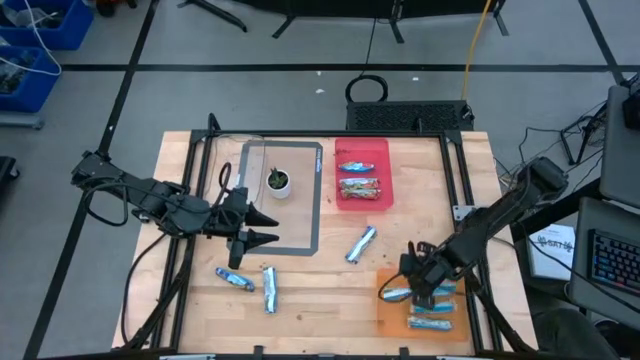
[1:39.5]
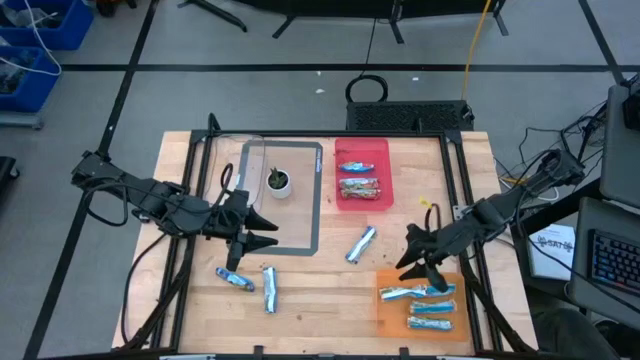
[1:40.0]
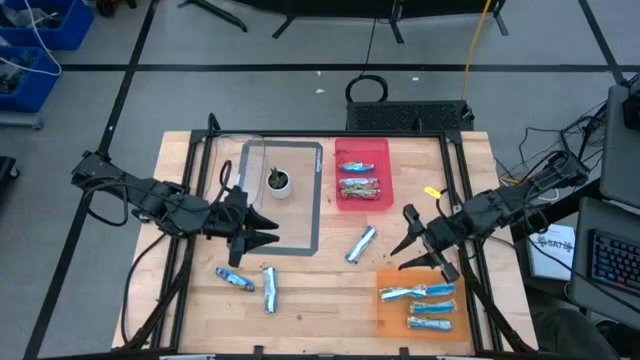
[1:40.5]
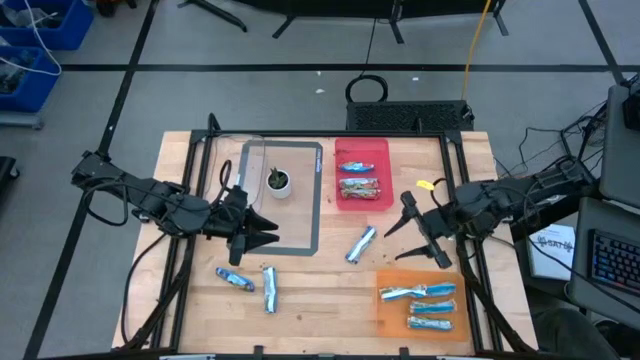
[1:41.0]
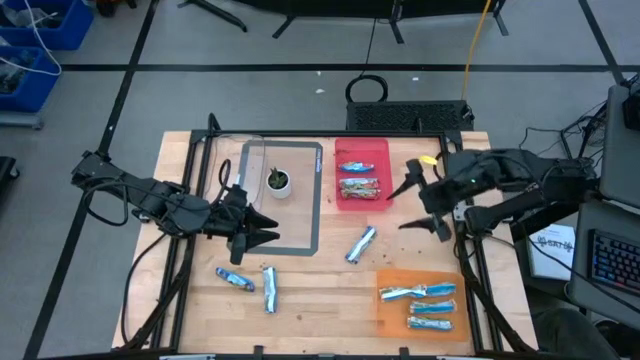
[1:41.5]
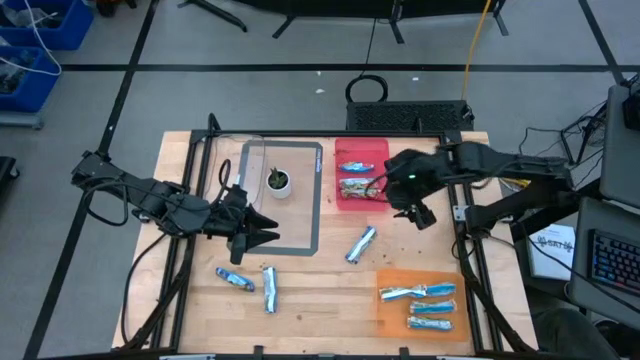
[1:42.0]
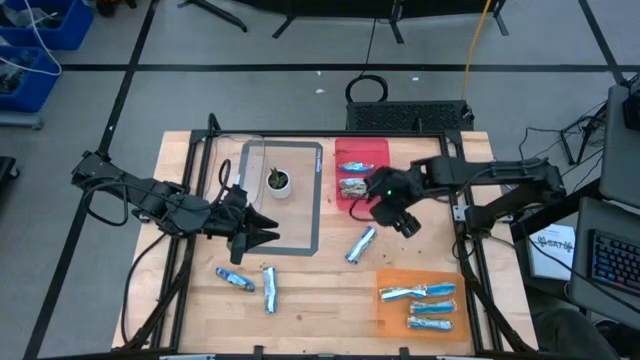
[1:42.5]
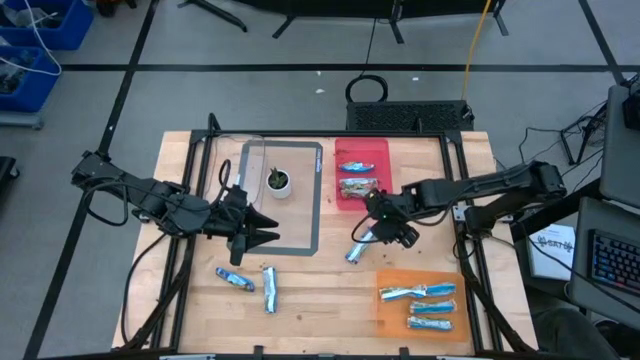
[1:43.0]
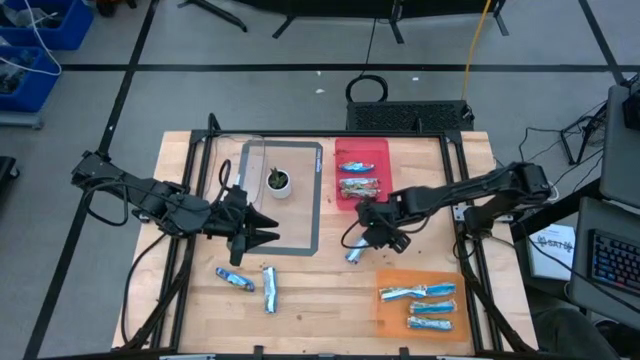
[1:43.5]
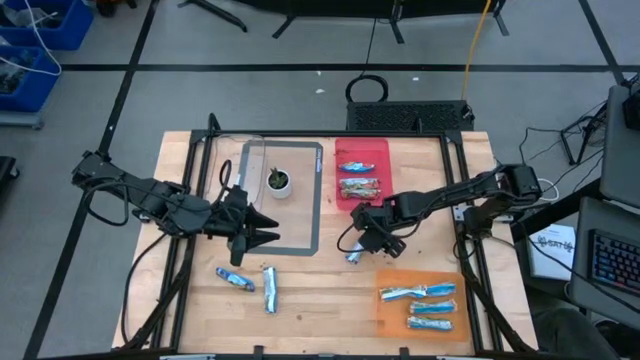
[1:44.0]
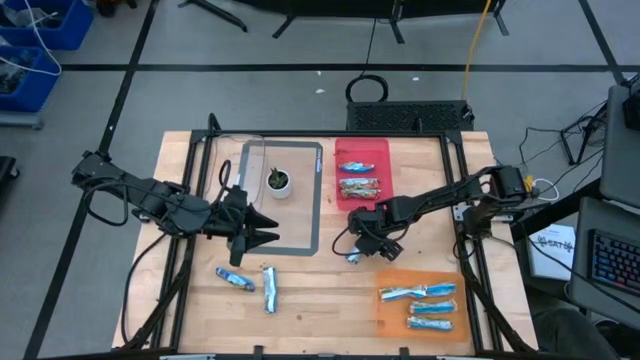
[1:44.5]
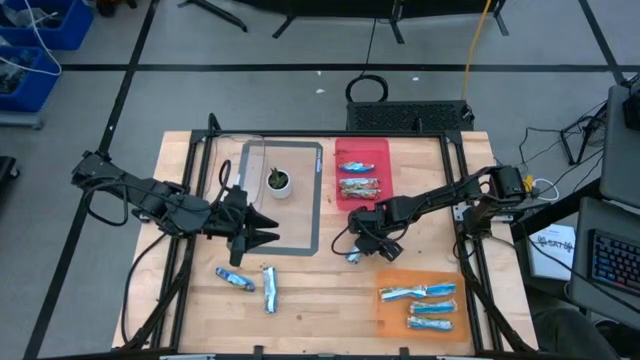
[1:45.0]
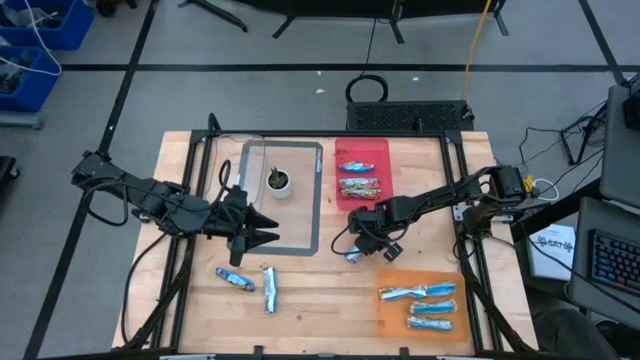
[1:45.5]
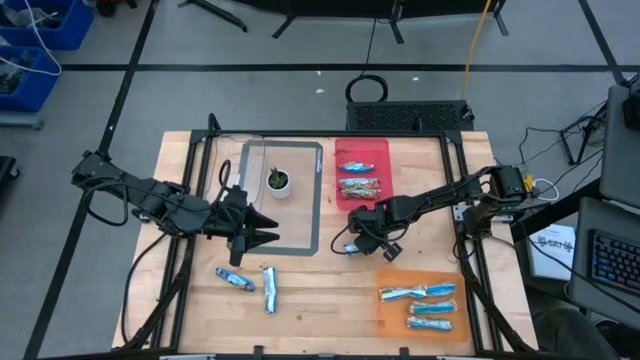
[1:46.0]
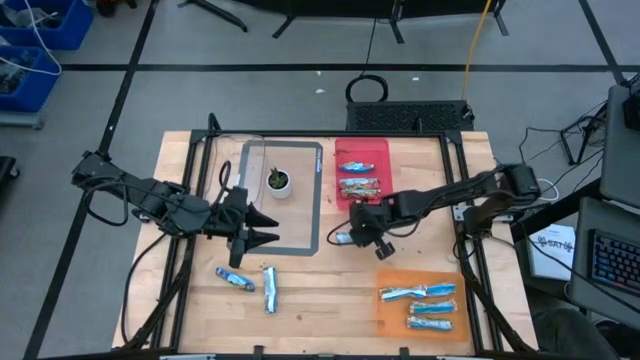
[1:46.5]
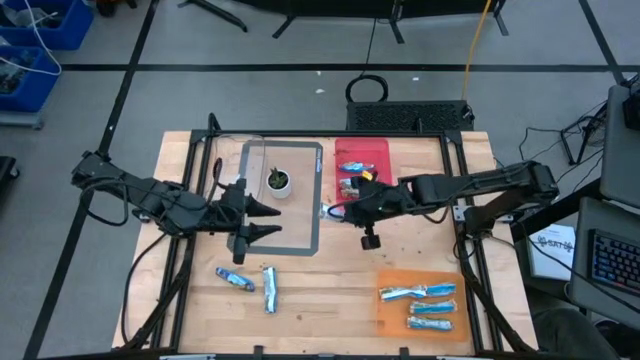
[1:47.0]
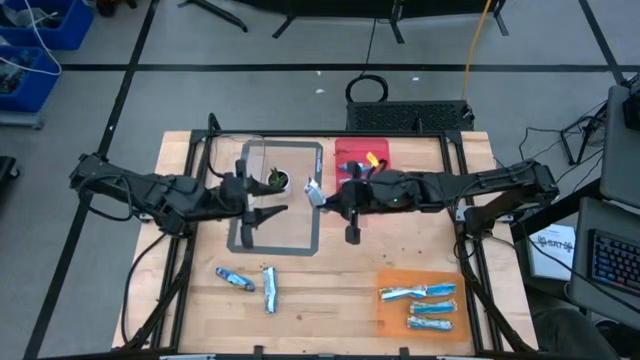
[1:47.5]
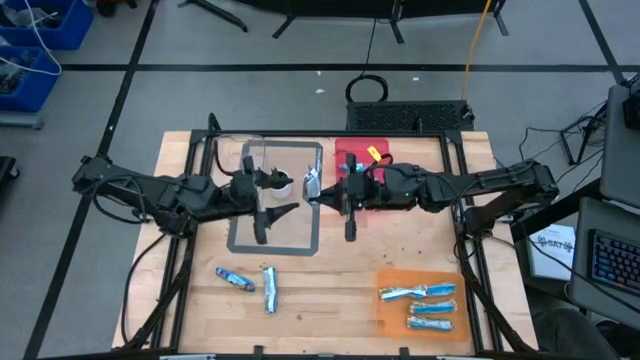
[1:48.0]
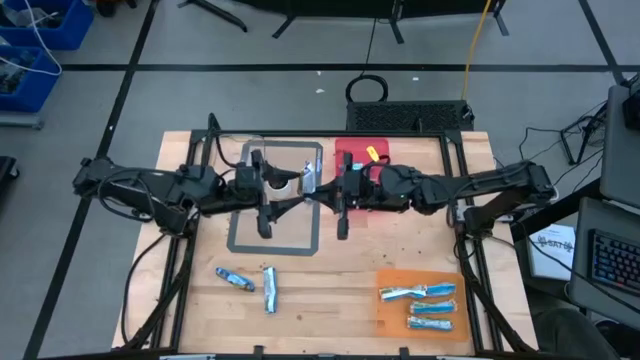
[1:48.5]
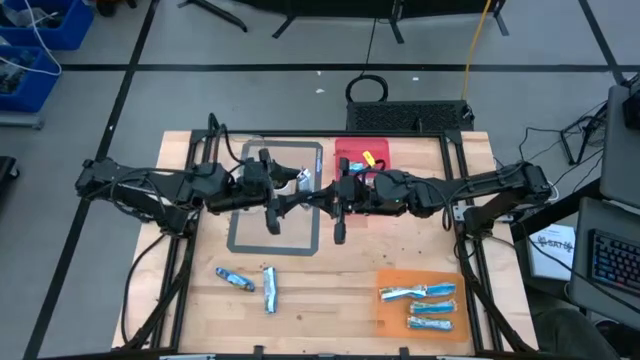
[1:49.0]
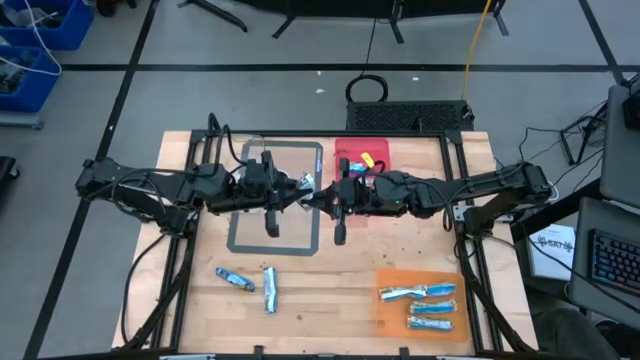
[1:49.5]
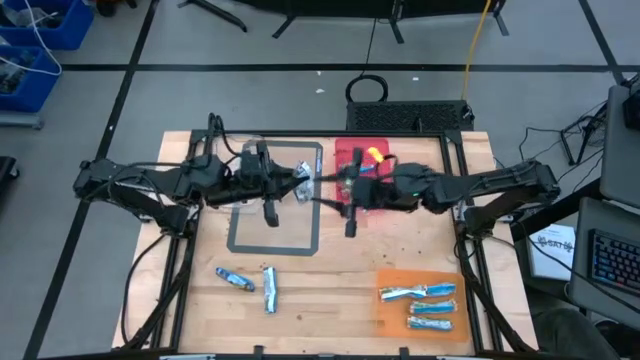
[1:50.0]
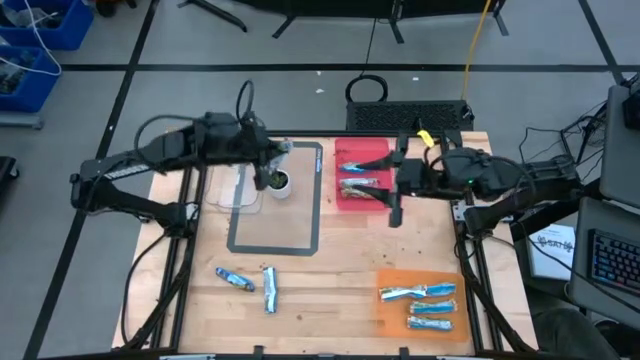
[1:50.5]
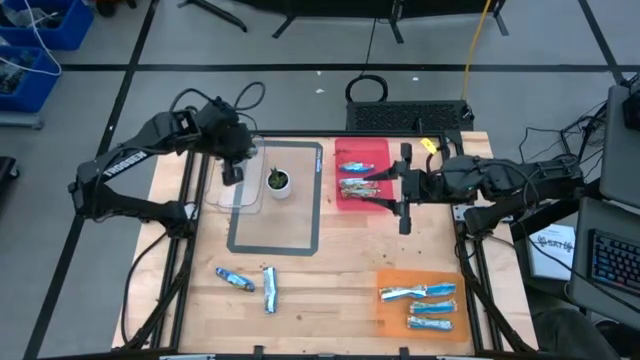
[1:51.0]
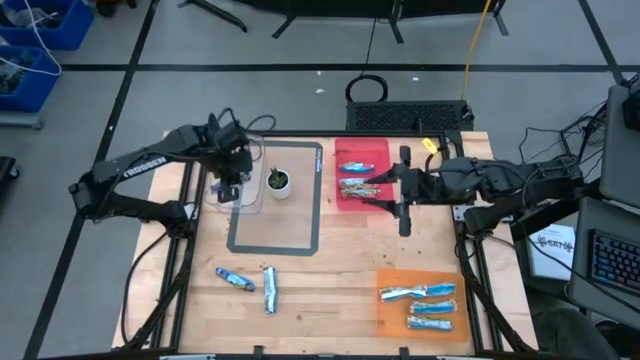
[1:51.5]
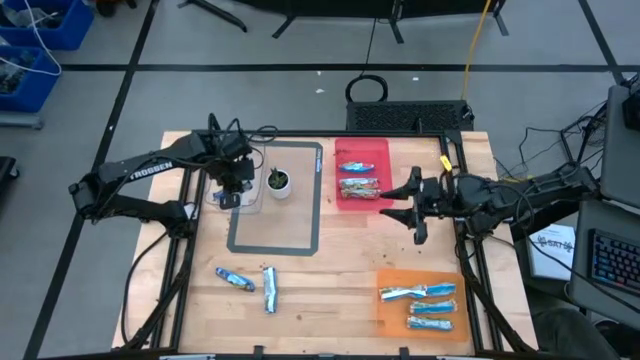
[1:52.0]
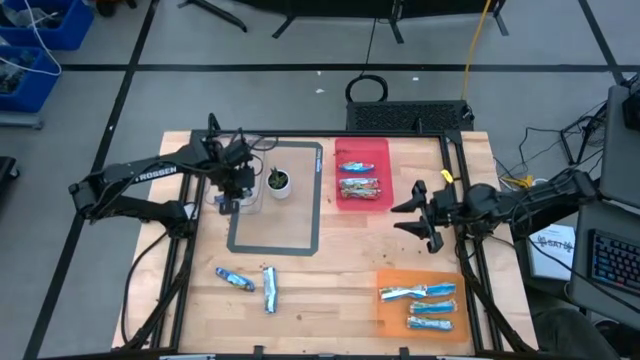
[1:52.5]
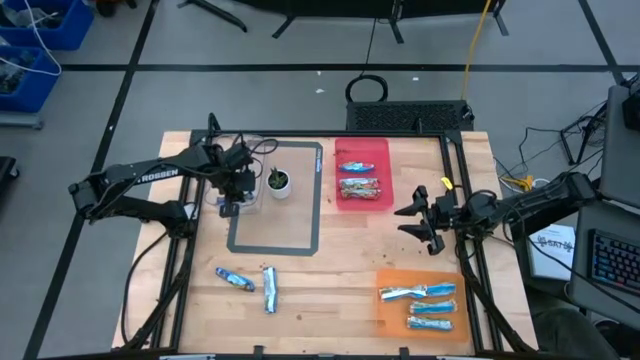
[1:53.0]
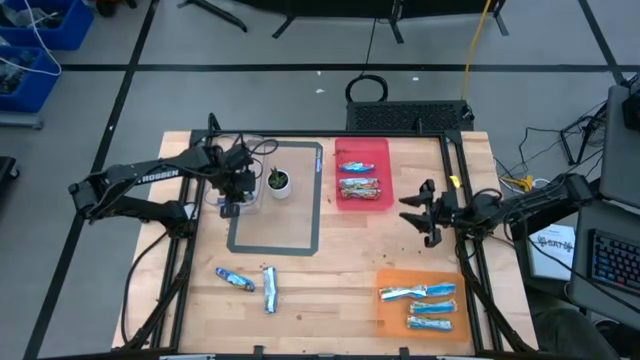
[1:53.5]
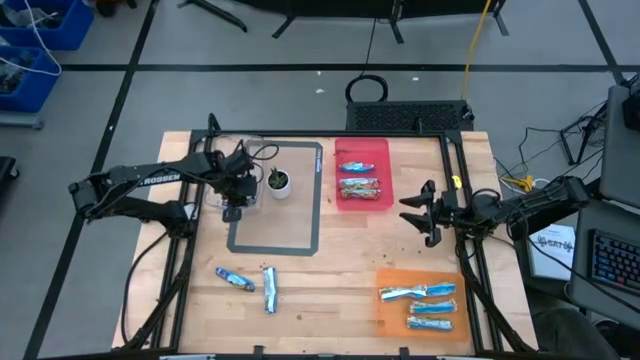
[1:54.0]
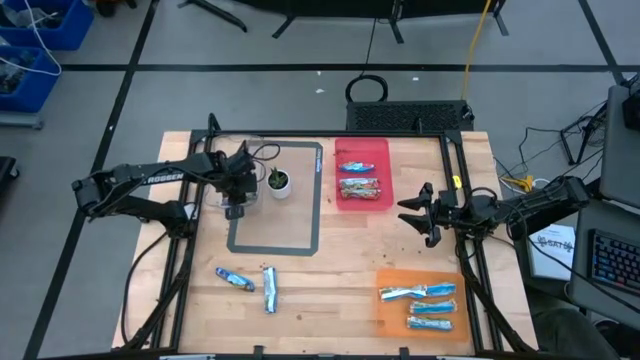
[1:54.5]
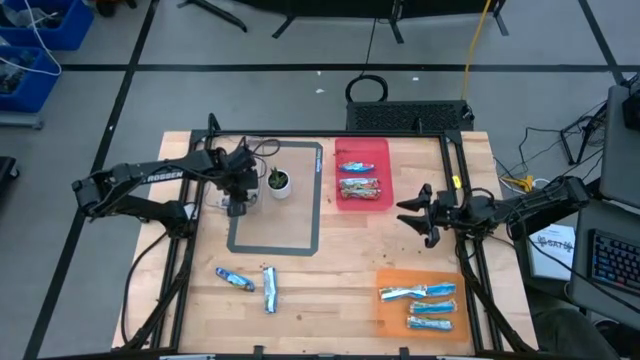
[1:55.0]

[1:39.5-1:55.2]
Task: Pick and place Granola Bars by type
Put the blue granola bar into the transparent bin

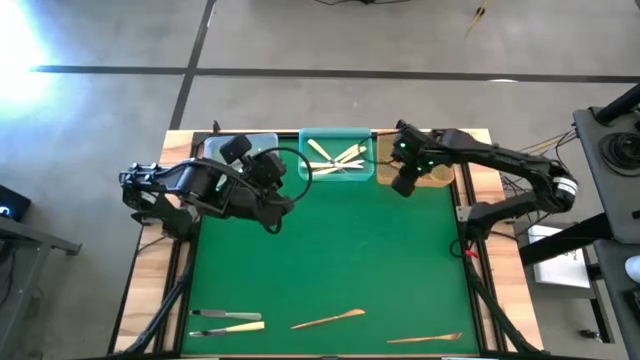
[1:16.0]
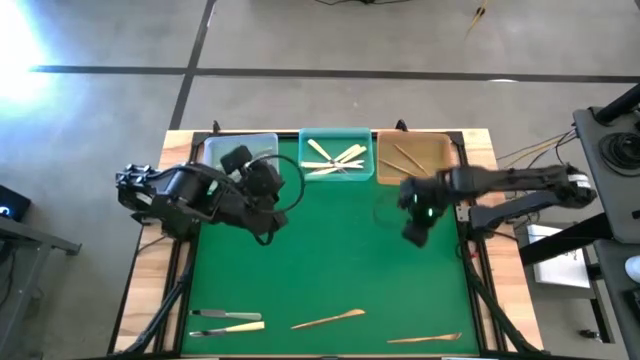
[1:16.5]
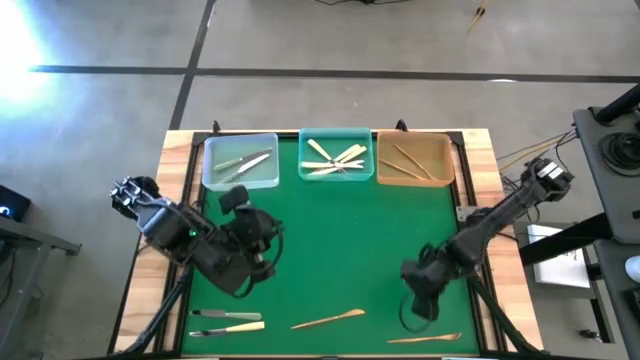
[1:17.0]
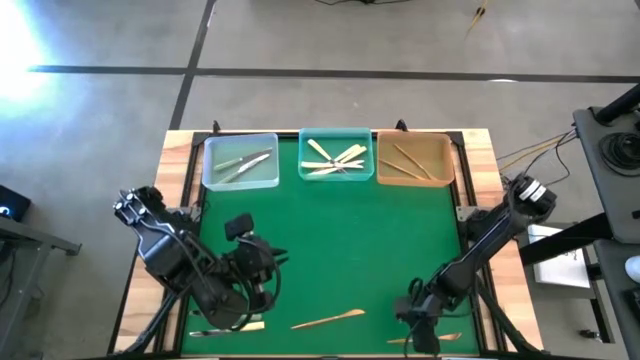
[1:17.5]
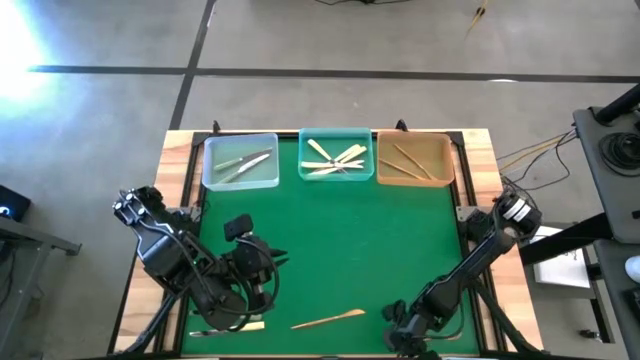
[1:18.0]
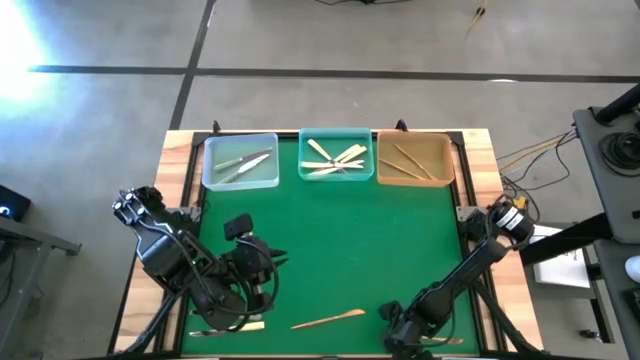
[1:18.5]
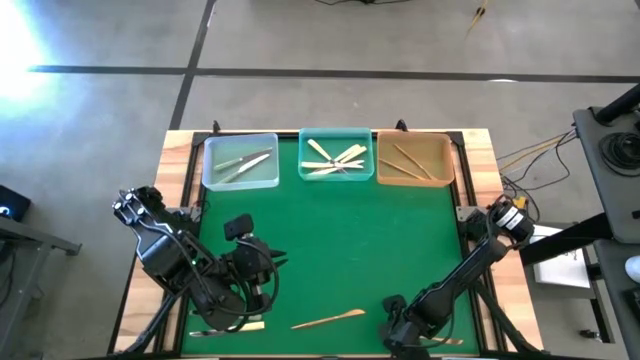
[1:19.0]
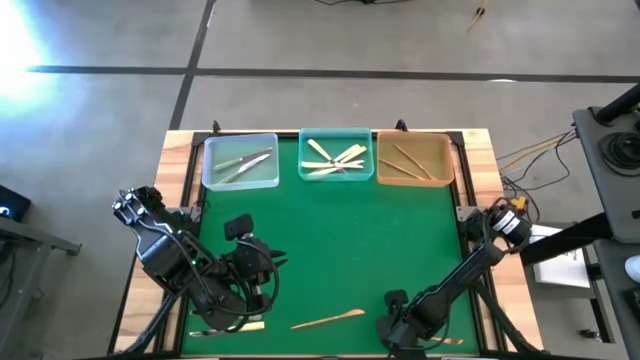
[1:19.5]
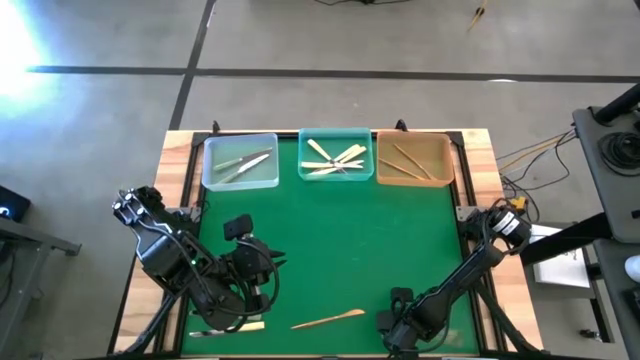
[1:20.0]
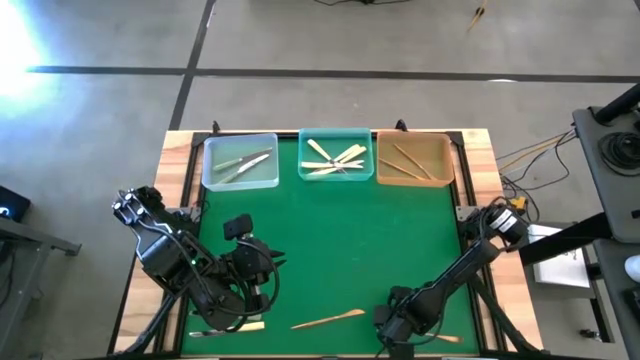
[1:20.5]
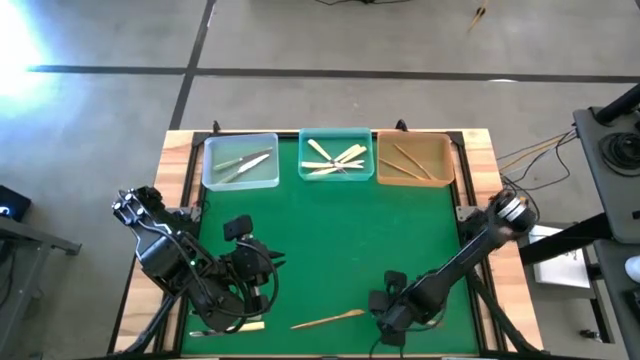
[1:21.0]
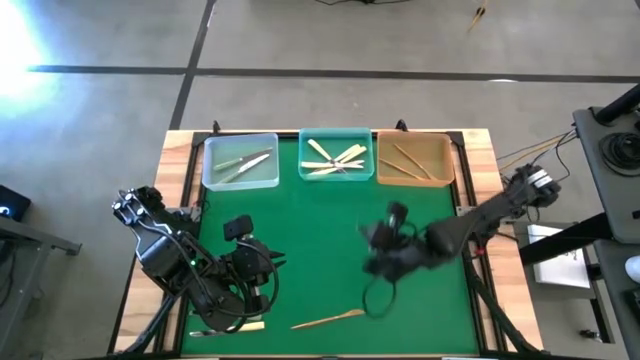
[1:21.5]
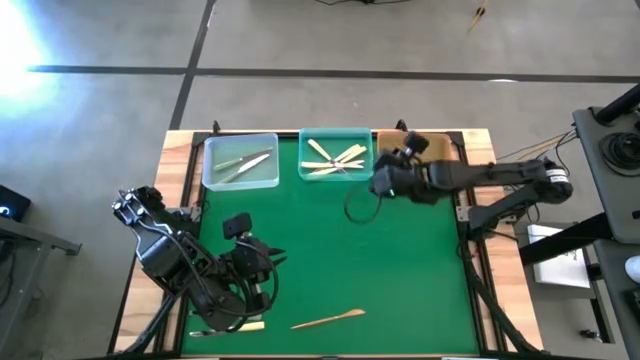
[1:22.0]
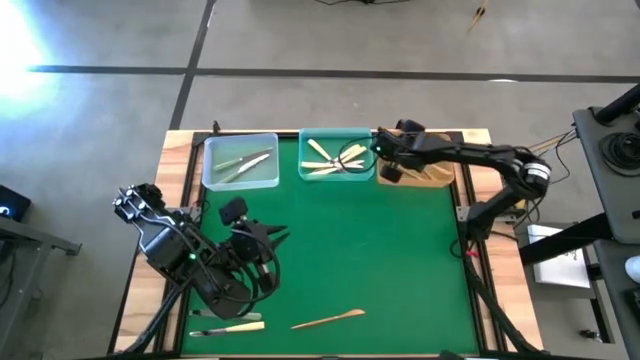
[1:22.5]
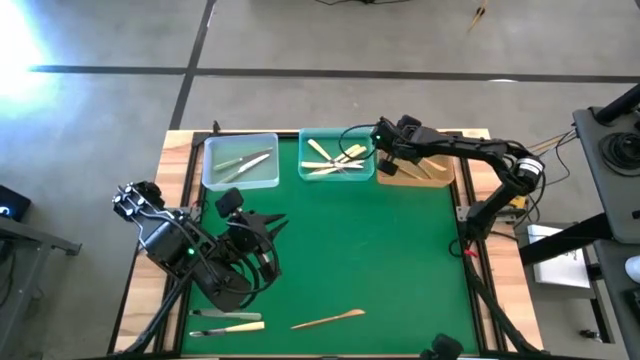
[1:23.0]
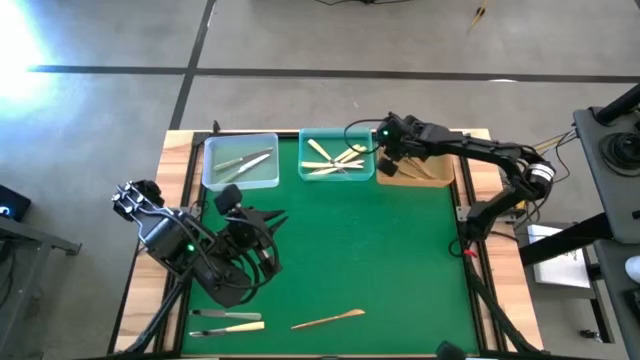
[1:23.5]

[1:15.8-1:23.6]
Task: Sort silverware by color (type)
Put the right gold knife into the yellow bin
